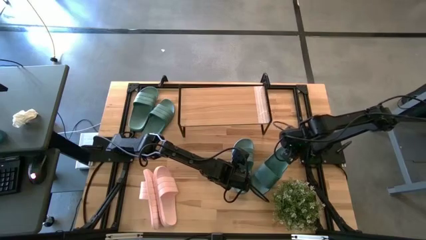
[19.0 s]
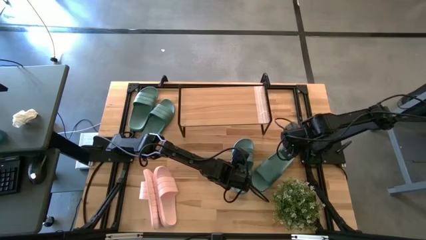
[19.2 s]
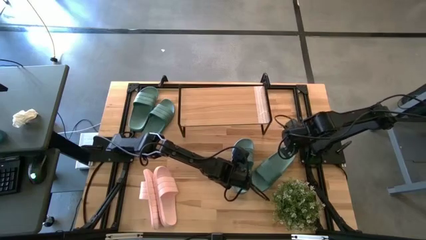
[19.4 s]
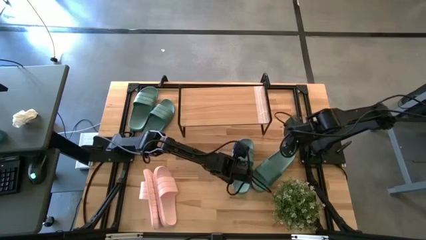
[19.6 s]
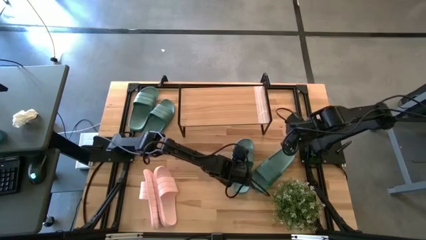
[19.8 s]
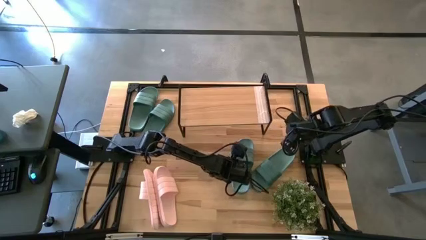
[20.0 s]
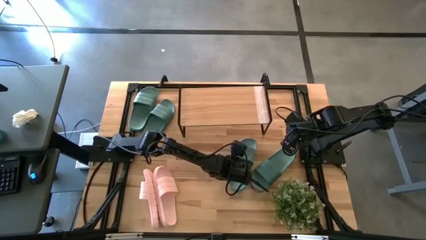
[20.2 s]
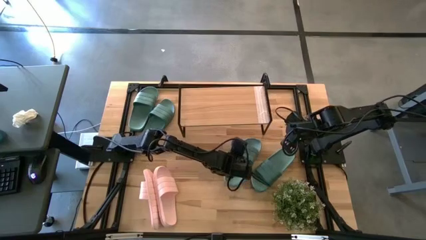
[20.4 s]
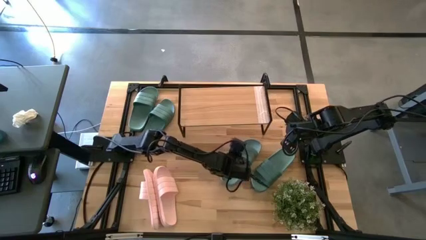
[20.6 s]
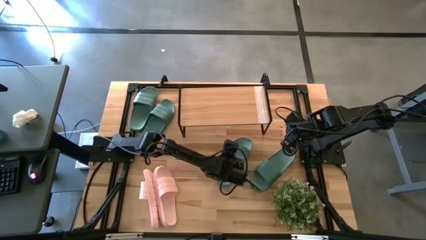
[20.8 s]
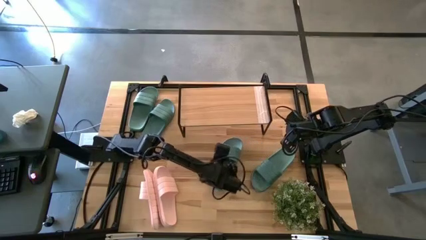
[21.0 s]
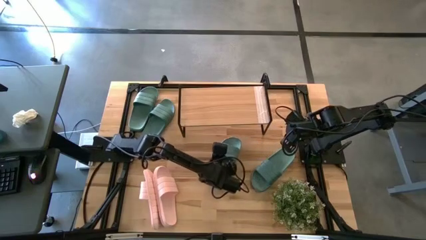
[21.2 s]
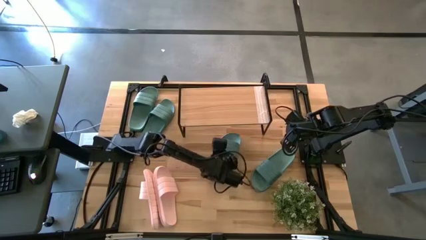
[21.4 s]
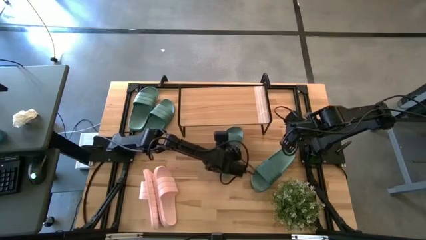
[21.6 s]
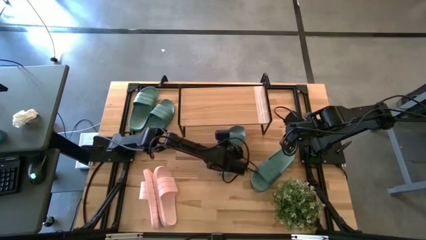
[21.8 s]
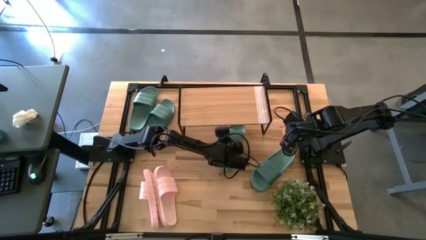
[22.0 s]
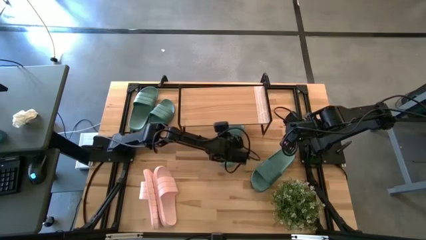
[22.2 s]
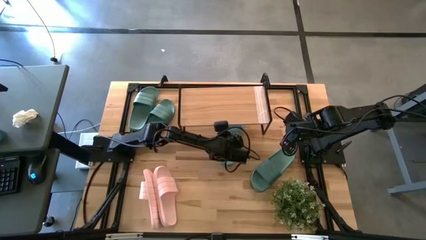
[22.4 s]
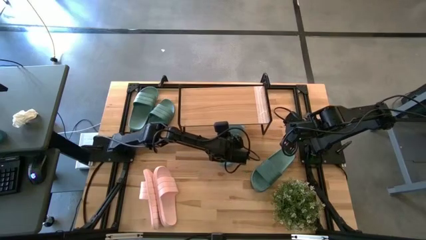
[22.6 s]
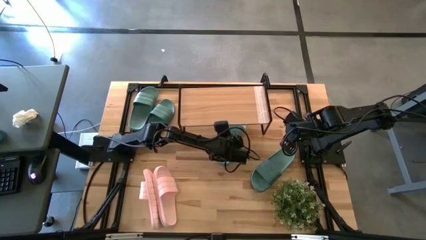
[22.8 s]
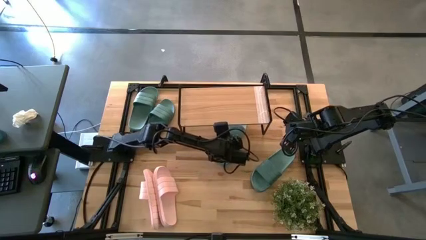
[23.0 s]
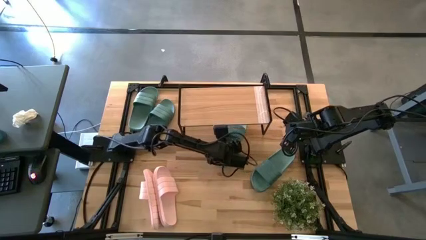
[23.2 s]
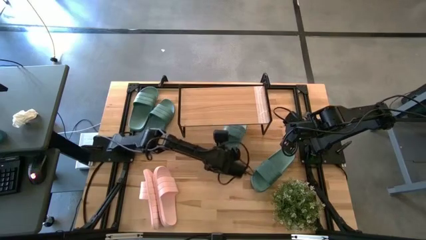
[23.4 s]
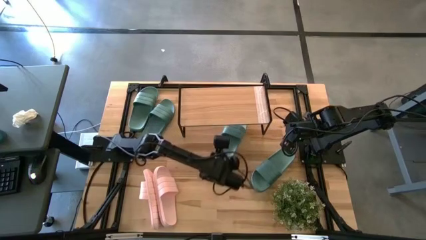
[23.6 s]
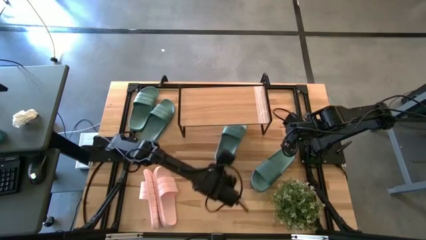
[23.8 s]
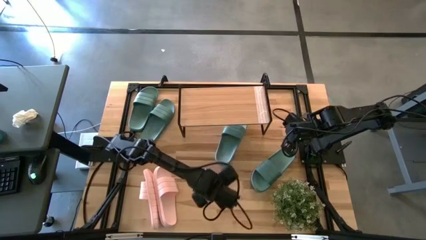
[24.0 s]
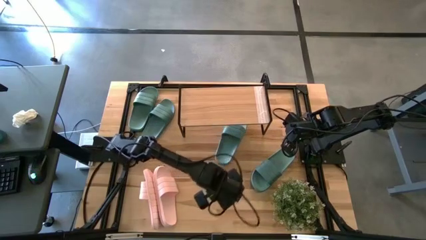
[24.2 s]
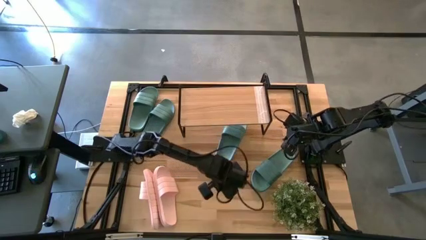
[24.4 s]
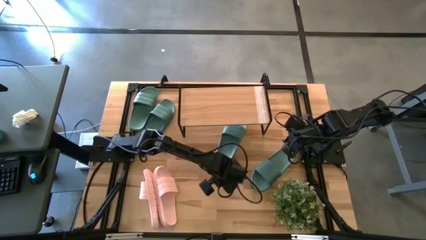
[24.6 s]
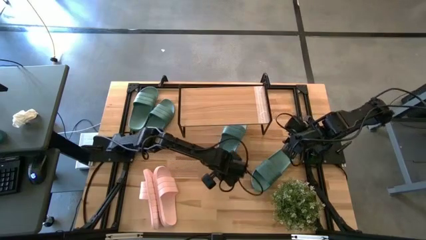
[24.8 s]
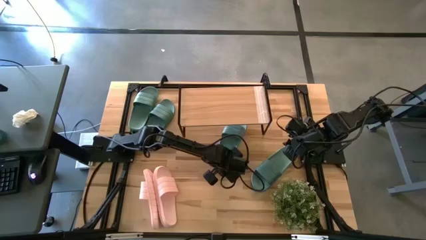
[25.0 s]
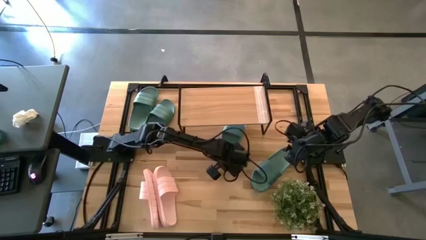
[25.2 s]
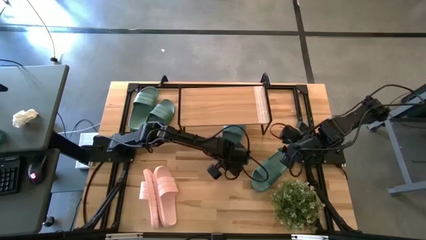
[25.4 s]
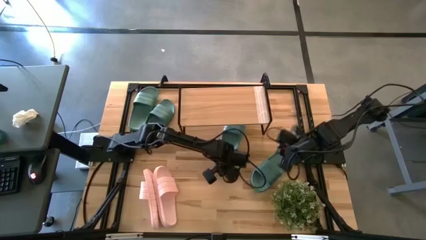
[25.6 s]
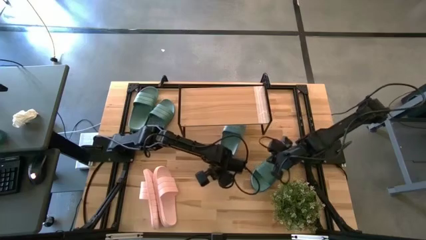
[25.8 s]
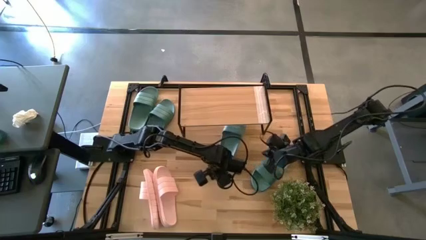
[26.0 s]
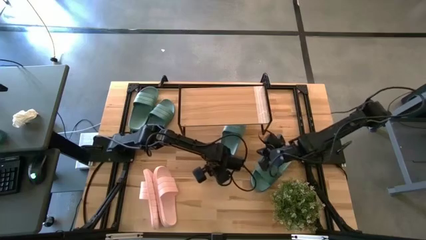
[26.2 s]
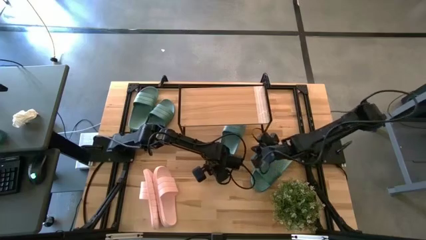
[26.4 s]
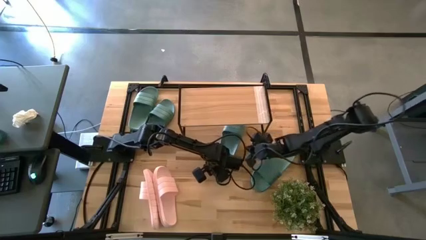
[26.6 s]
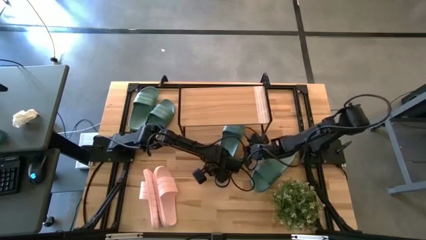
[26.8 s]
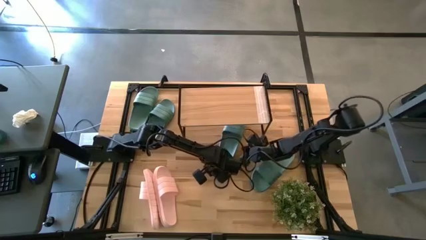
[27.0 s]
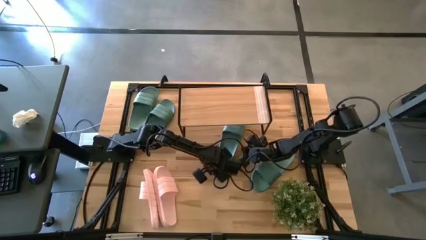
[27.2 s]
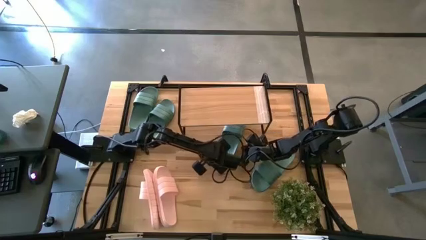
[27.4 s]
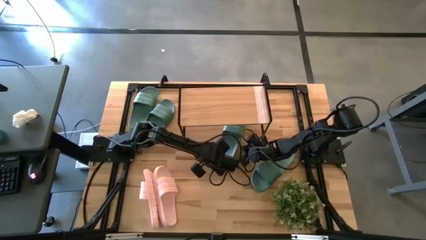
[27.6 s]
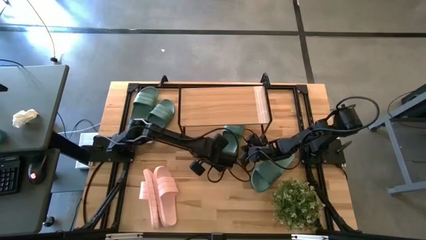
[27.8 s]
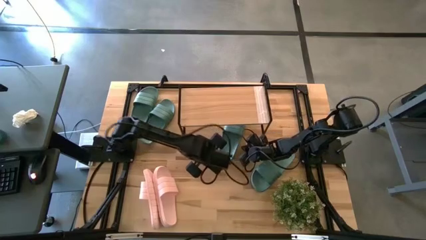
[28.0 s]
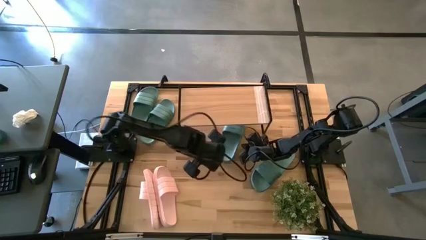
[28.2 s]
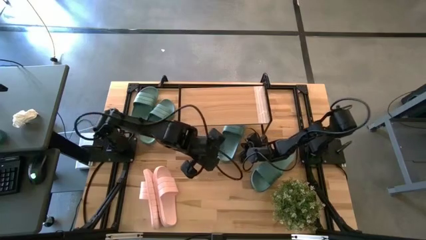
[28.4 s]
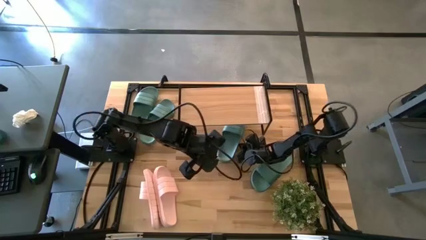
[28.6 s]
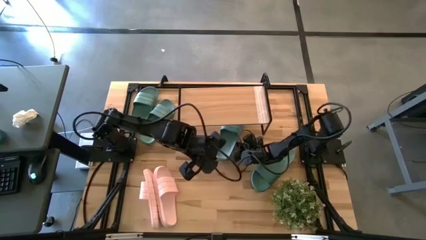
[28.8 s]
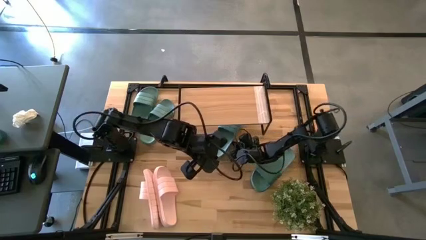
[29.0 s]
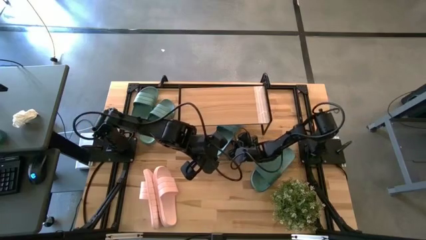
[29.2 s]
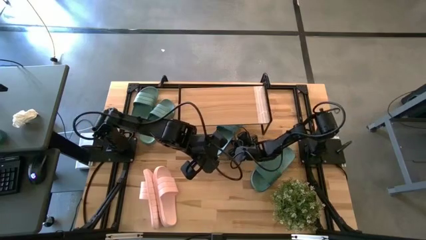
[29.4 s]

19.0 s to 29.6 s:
Task: Pick and place slides into the shelf
Put the green slide under the shelf
